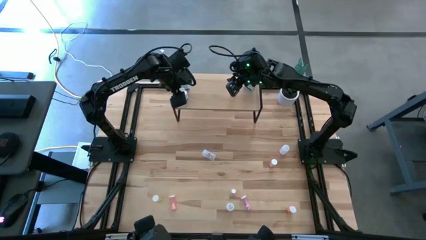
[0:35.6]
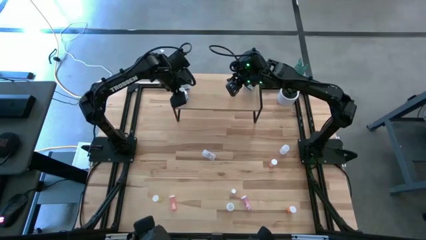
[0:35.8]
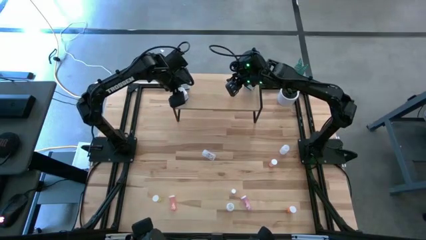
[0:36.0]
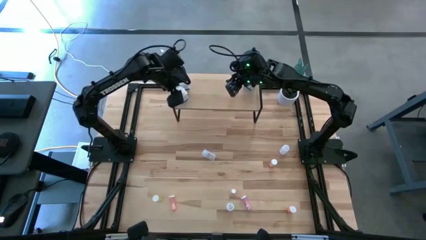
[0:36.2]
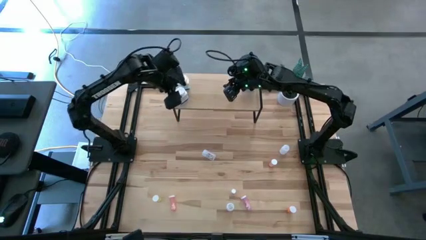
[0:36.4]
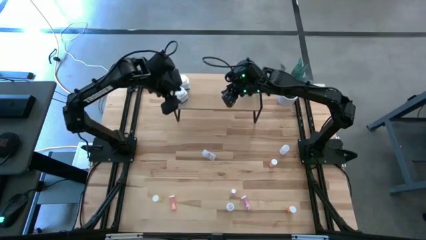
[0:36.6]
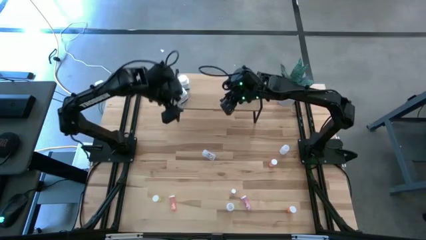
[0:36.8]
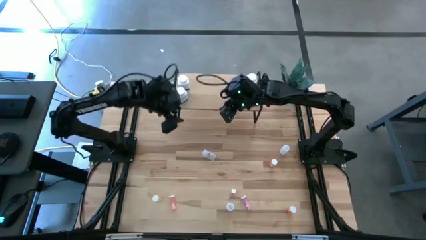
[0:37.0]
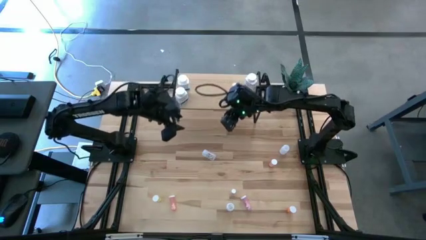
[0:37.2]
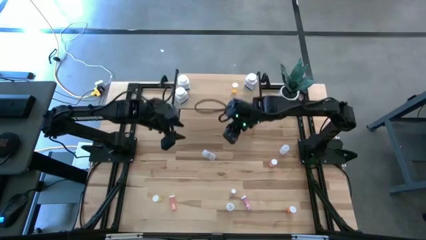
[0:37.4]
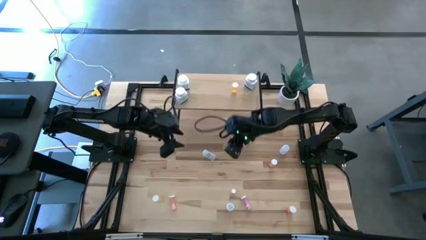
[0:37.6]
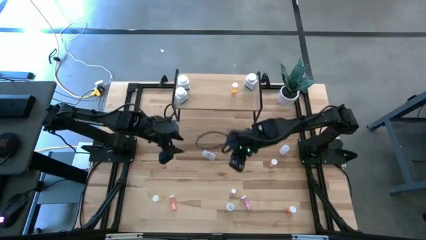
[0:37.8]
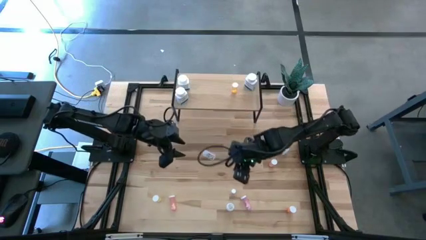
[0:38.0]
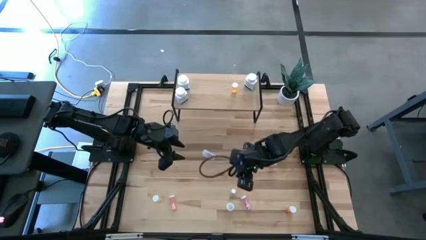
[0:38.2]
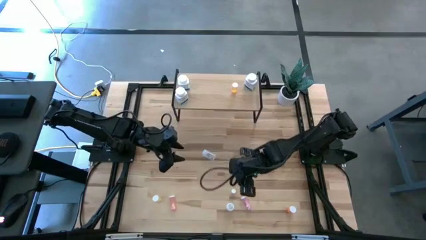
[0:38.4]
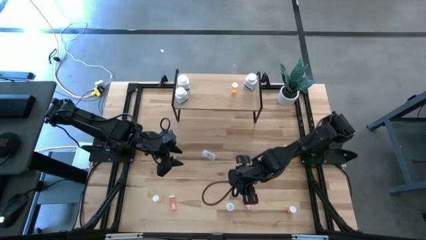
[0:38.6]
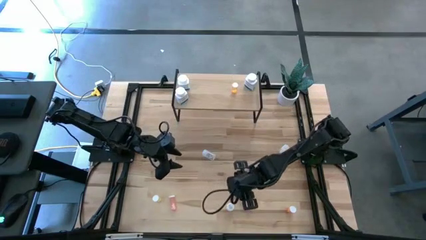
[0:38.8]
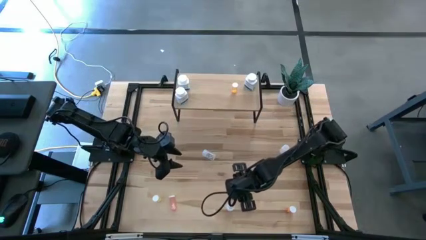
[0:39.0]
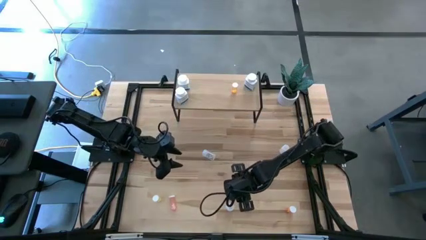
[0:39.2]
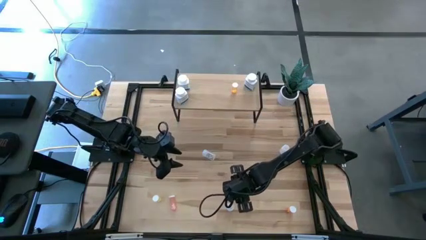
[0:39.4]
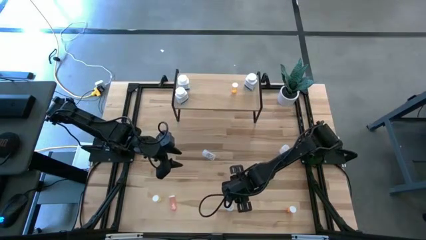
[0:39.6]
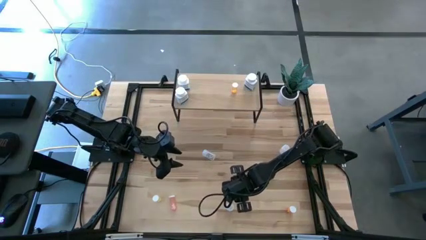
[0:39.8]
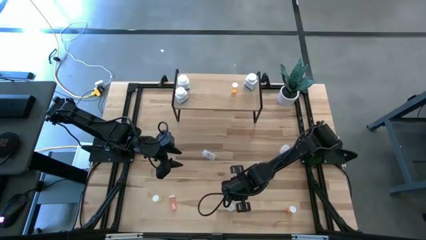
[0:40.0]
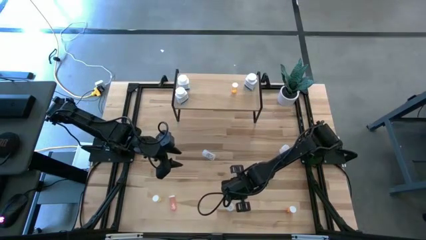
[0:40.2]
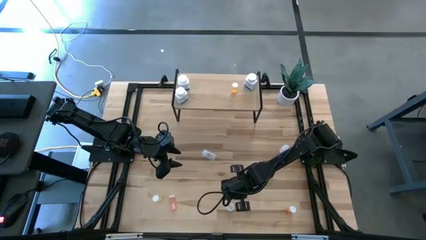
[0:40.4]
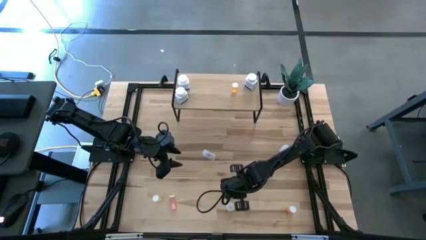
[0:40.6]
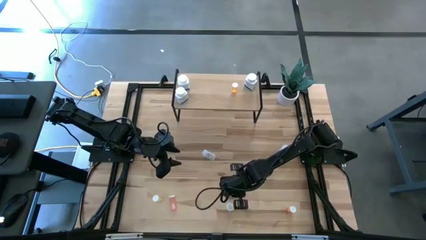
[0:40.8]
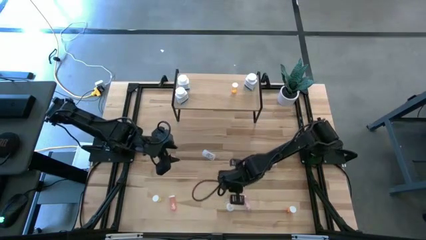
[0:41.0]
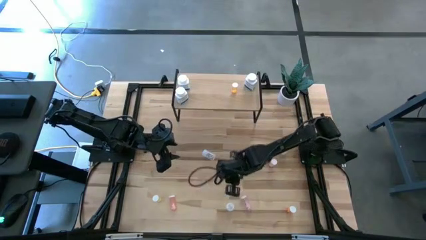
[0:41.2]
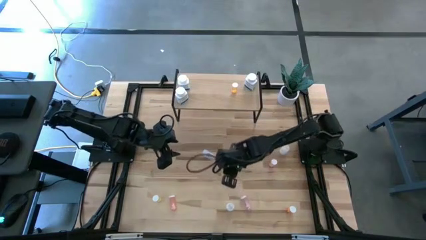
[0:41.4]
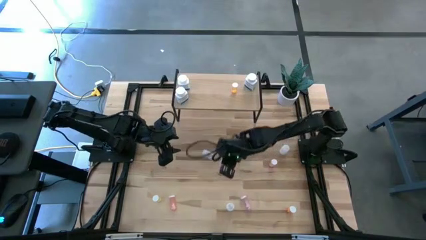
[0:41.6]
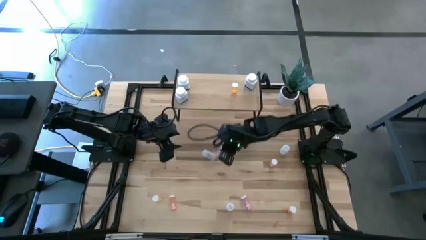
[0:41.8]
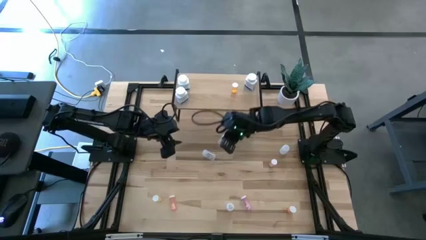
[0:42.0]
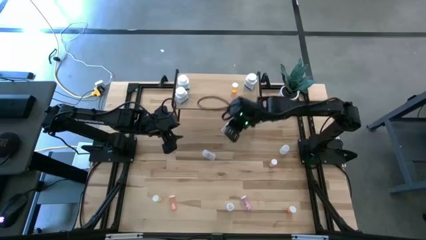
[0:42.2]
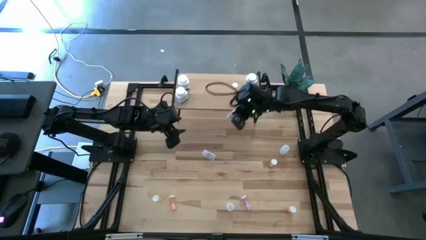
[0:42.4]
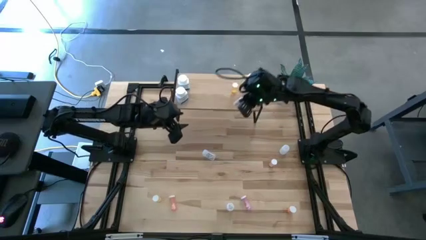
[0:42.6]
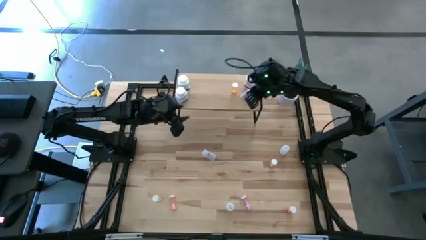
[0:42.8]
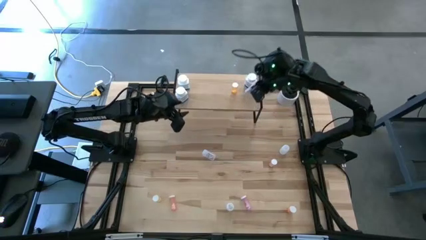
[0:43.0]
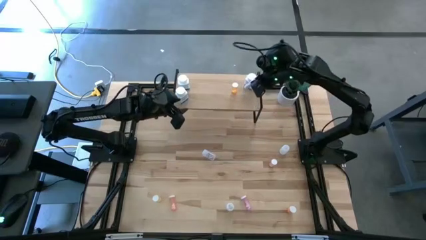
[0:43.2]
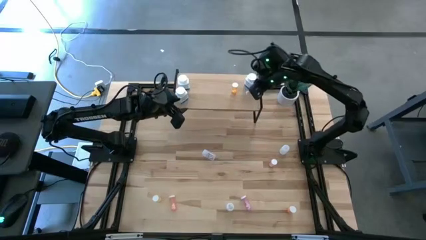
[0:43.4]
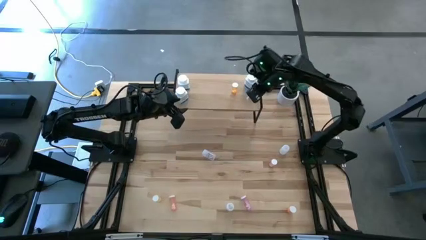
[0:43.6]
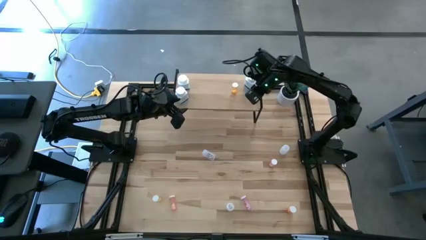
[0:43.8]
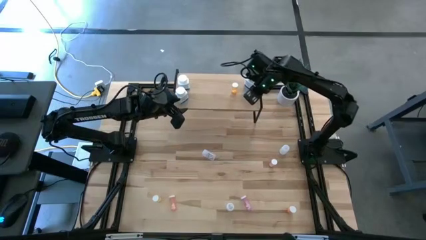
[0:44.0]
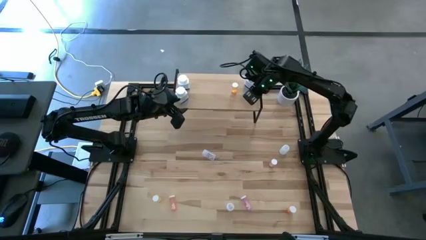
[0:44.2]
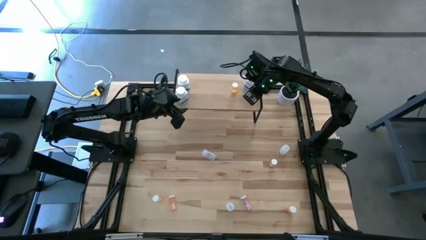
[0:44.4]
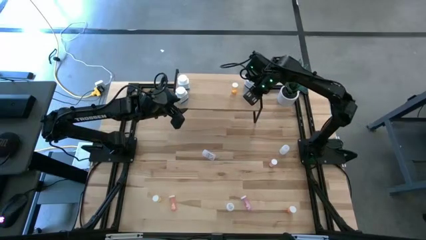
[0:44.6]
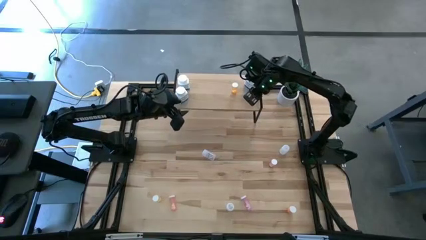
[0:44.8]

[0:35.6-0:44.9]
Task: Pick and place medicine bottles onto shelf by color
Put the thin white pill bottle on the shelf

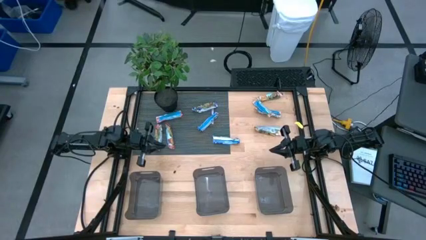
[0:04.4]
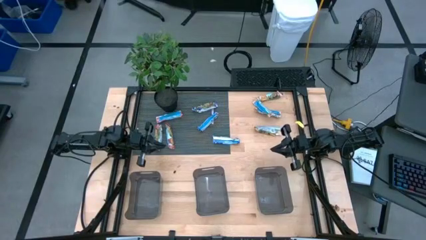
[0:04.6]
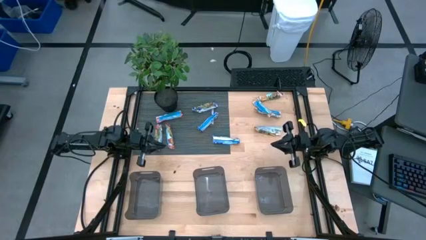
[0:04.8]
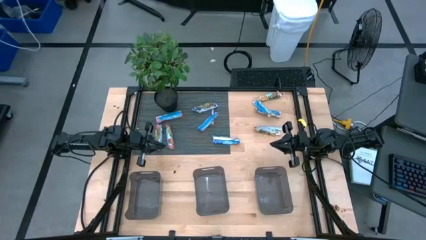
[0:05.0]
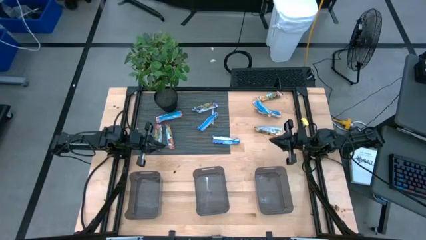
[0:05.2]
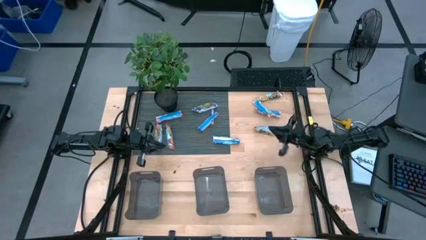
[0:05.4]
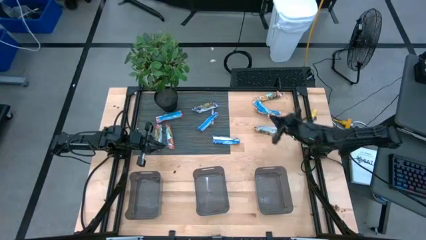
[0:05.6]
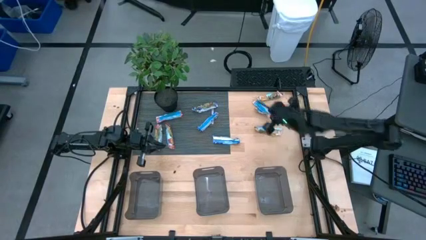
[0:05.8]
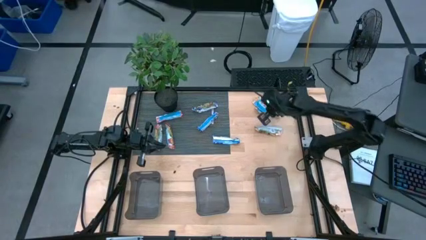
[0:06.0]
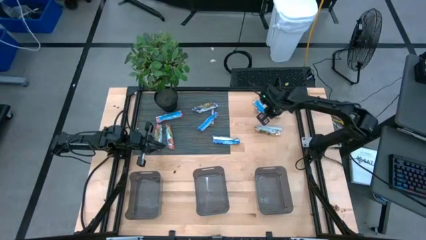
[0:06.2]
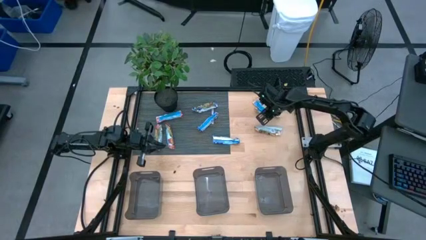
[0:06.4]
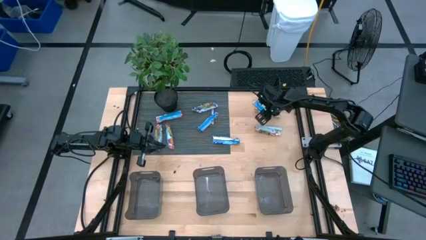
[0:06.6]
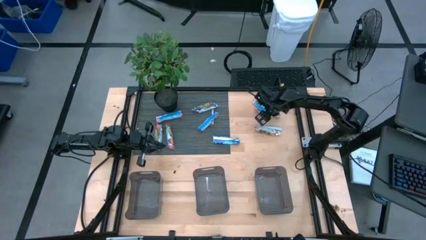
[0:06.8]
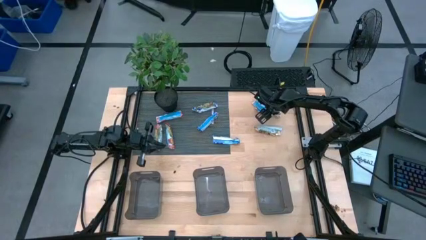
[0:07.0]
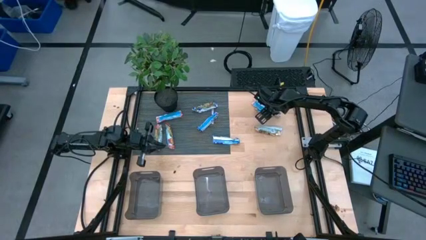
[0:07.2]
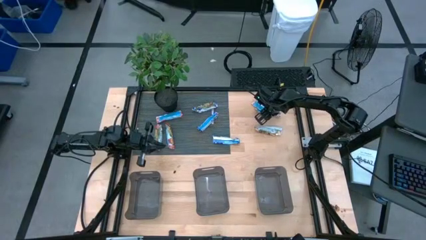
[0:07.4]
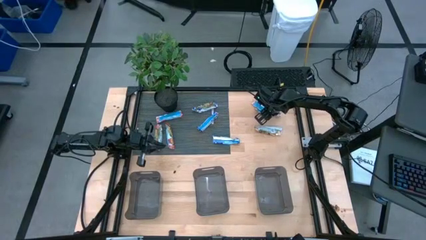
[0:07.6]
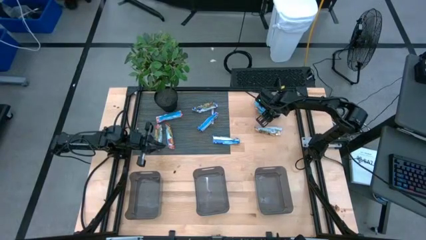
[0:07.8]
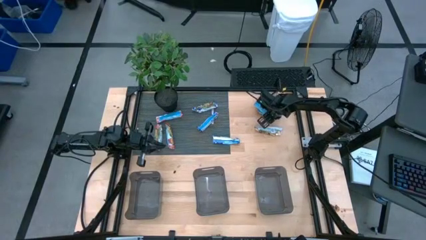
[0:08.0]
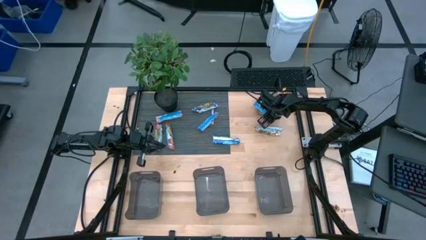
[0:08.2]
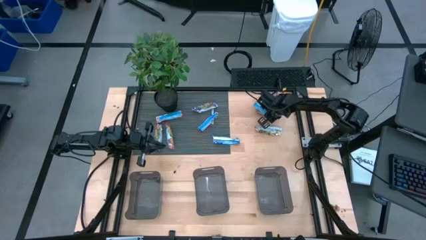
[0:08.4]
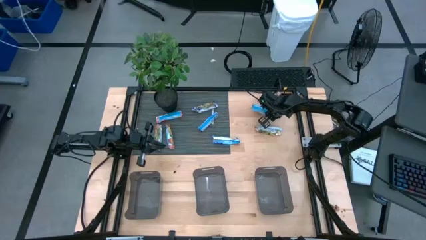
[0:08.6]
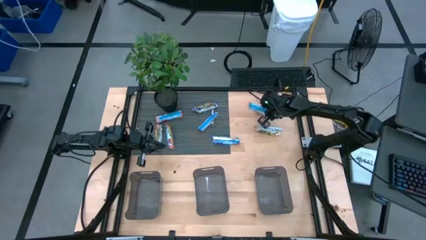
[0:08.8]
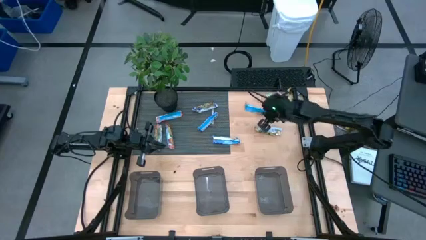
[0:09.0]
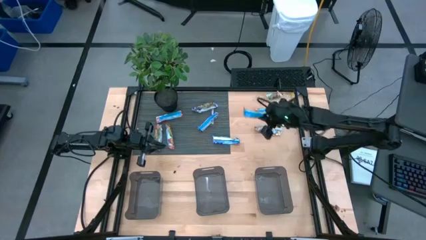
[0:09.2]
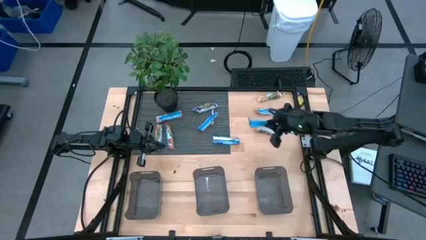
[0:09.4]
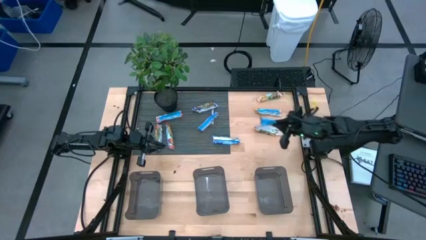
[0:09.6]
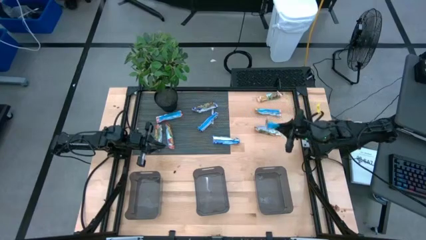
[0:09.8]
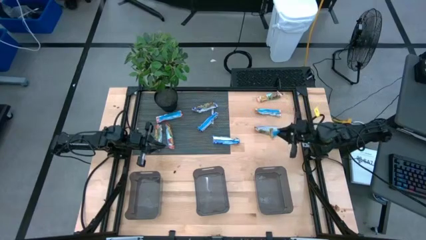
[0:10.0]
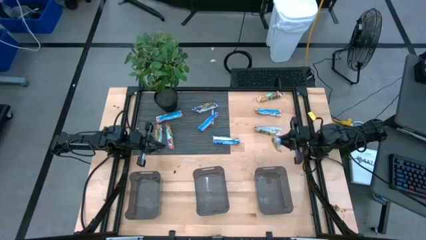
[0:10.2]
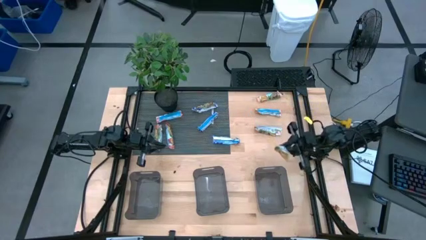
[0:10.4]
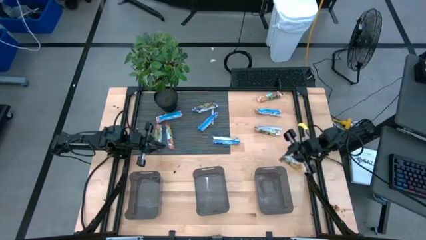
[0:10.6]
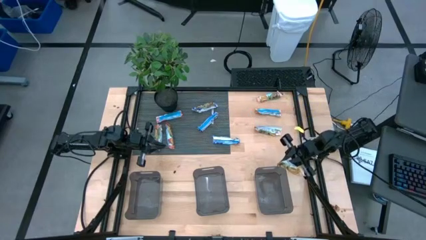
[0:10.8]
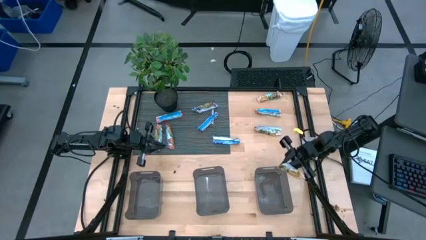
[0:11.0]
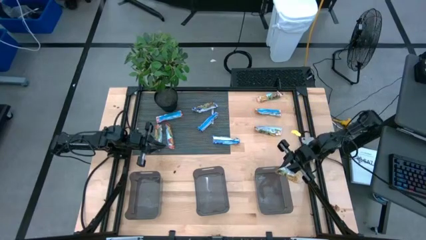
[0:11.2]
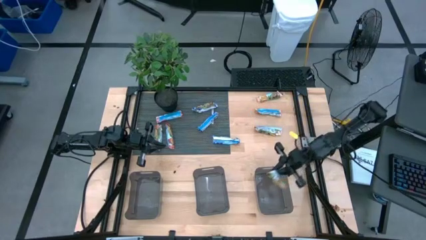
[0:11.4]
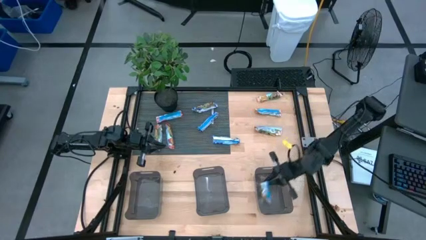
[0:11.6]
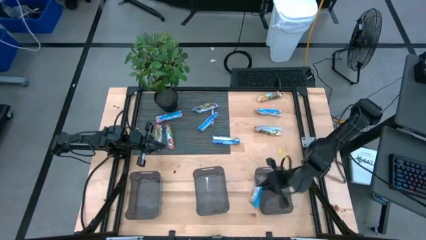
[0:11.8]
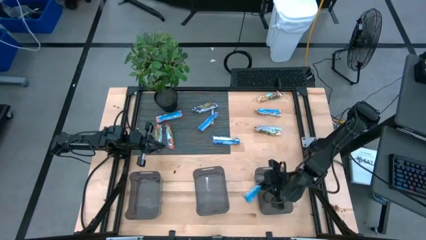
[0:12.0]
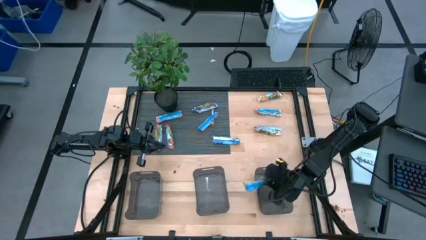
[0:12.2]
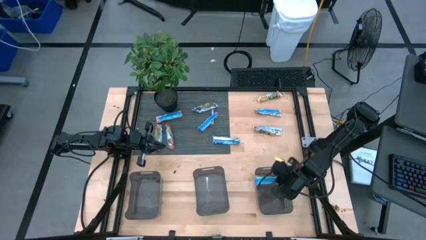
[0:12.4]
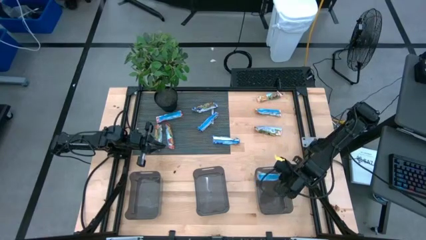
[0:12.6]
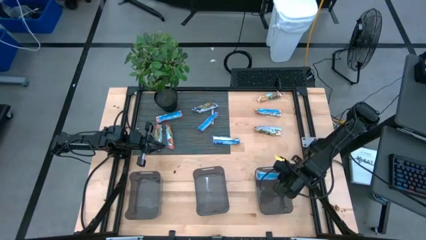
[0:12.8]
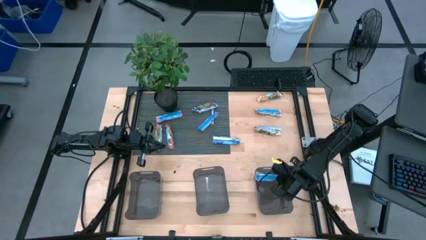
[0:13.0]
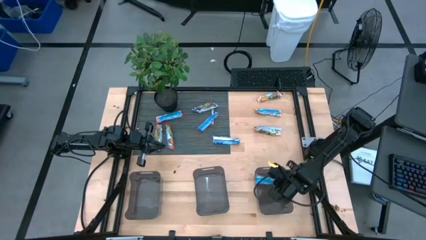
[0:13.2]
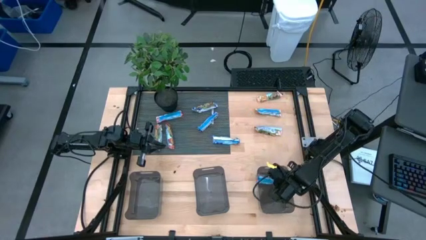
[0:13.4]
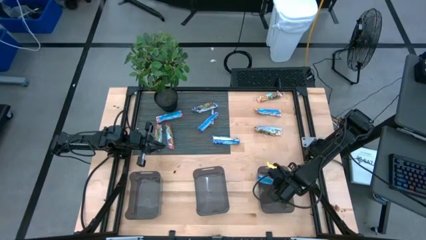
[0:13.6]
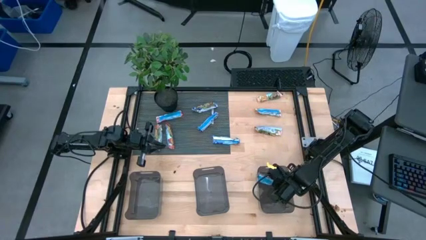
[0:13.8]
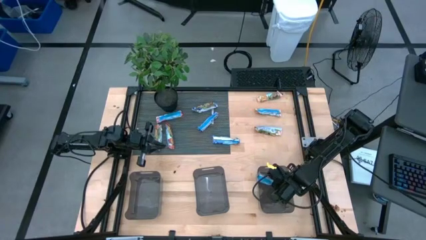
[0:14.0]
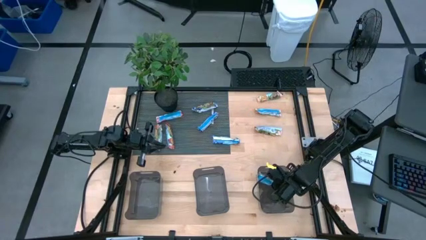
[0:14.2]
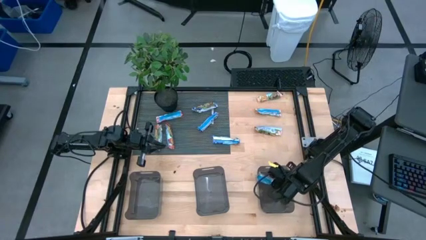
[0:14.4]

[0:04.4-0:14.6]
Task: Pick and place Granola Bars by type
Put the yellow granola bar into the right black bin
